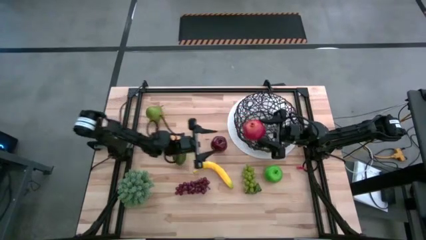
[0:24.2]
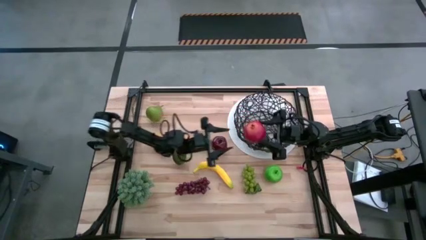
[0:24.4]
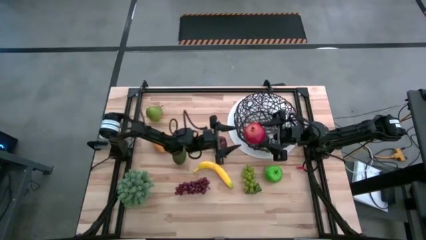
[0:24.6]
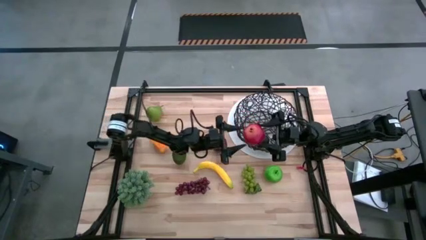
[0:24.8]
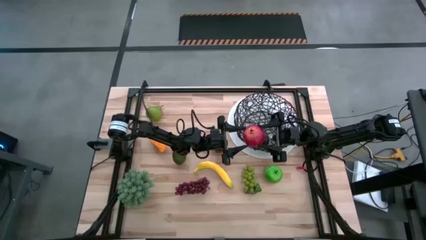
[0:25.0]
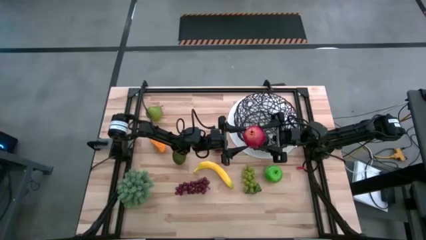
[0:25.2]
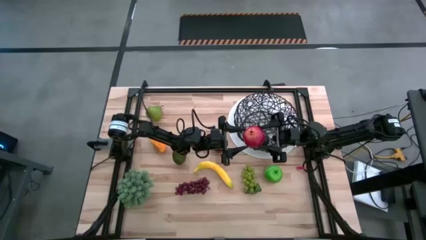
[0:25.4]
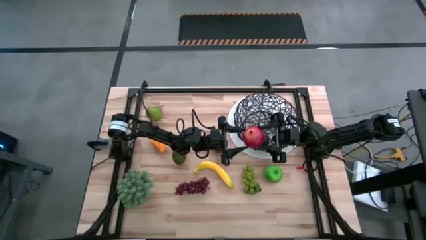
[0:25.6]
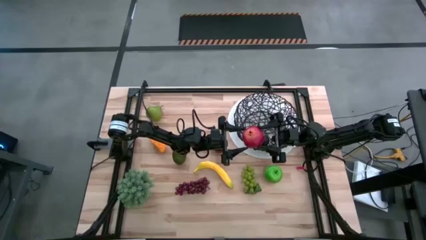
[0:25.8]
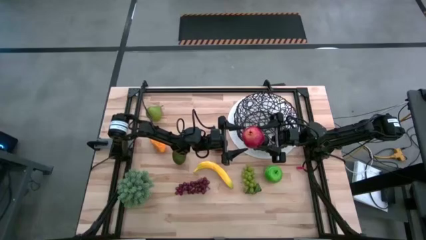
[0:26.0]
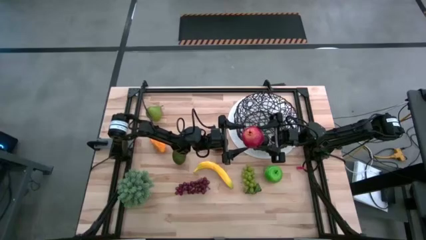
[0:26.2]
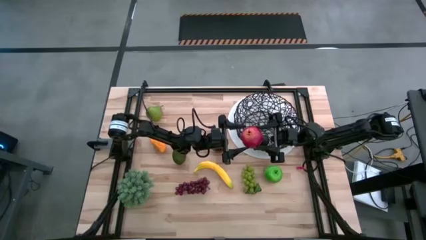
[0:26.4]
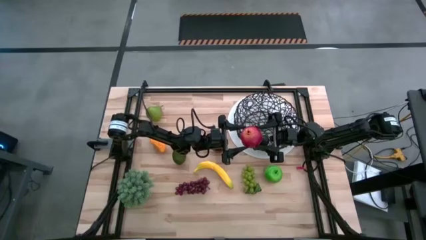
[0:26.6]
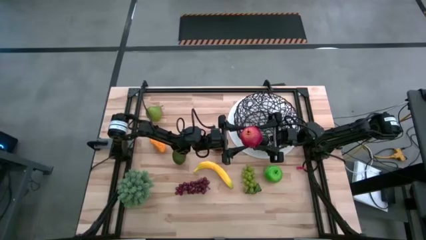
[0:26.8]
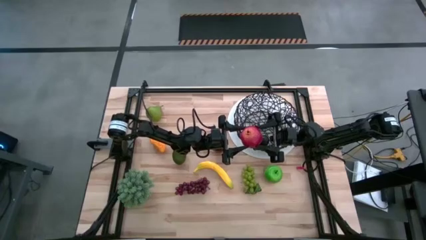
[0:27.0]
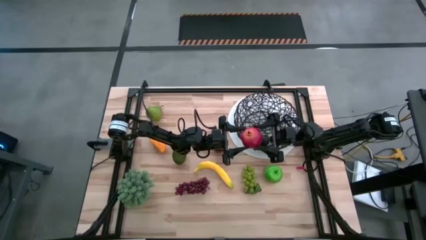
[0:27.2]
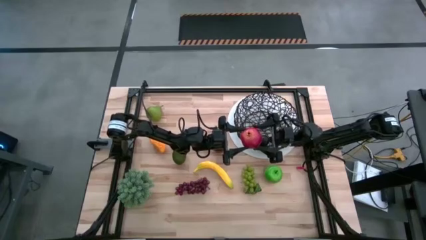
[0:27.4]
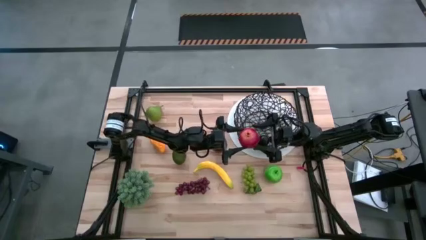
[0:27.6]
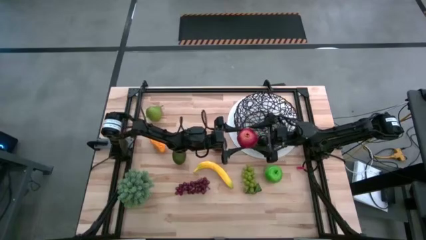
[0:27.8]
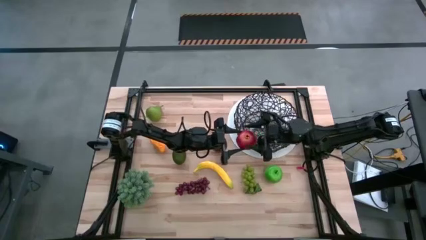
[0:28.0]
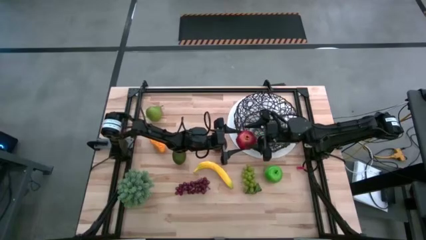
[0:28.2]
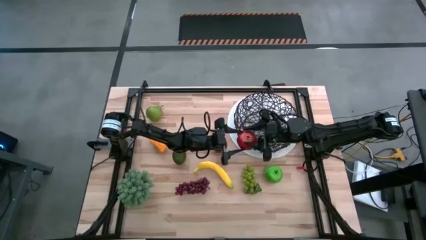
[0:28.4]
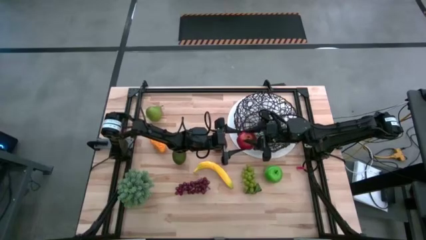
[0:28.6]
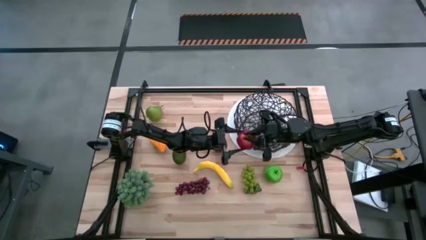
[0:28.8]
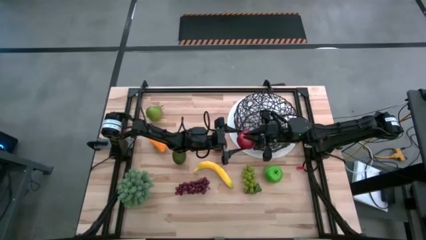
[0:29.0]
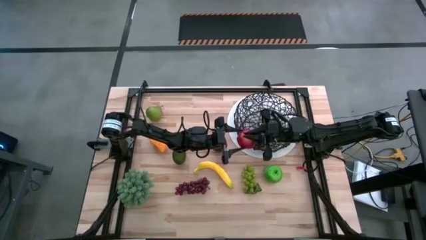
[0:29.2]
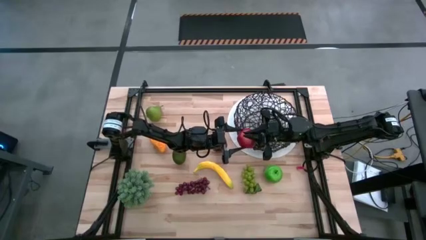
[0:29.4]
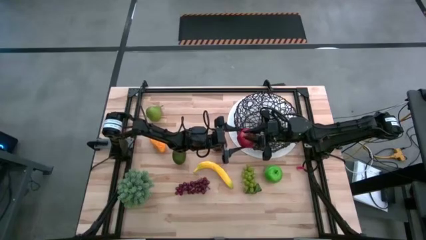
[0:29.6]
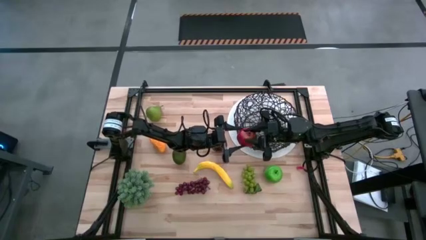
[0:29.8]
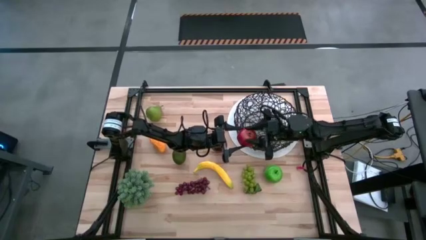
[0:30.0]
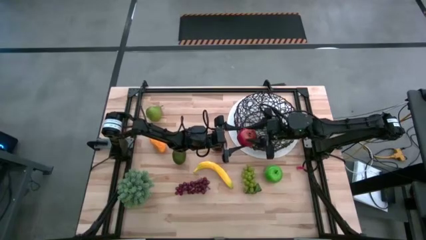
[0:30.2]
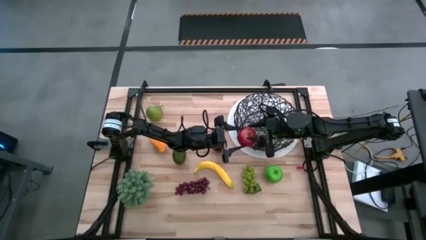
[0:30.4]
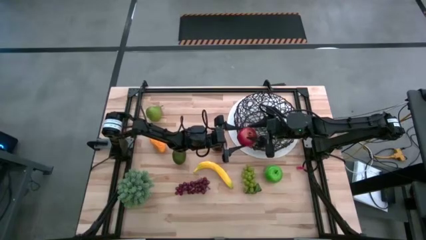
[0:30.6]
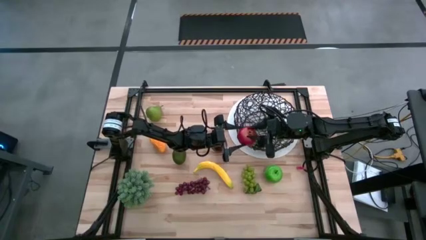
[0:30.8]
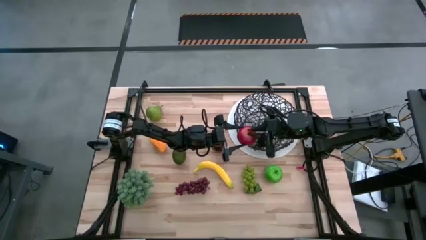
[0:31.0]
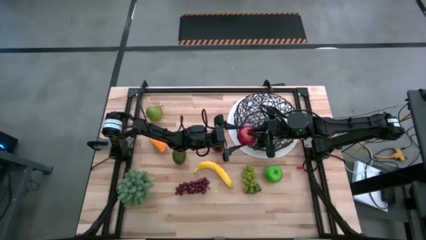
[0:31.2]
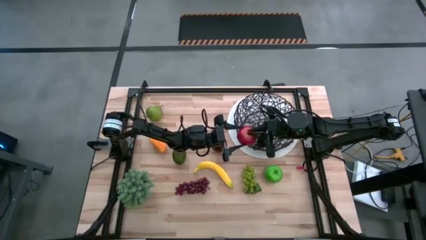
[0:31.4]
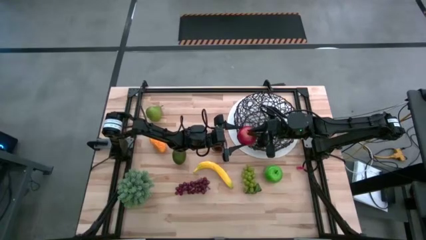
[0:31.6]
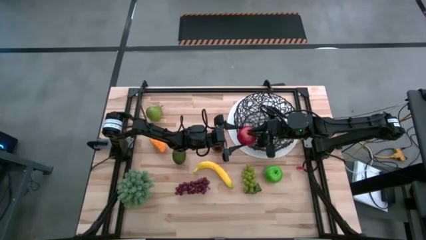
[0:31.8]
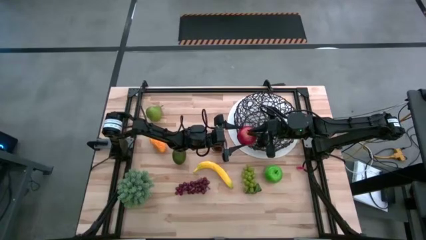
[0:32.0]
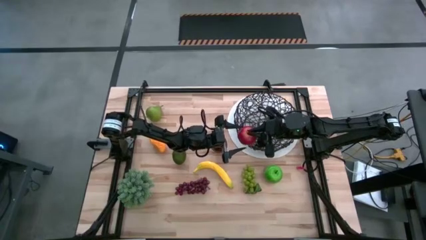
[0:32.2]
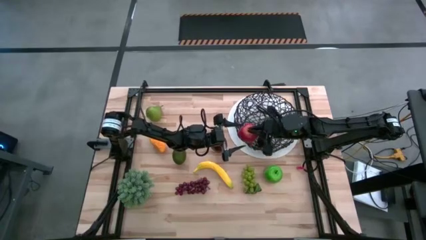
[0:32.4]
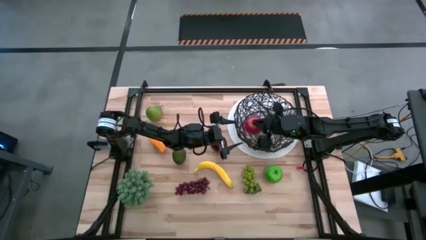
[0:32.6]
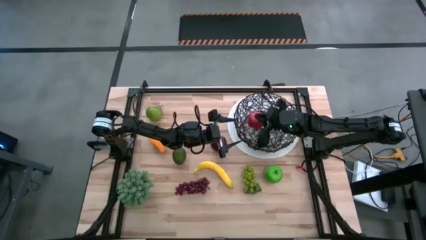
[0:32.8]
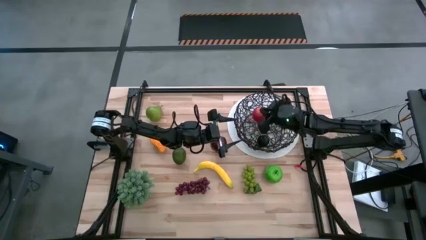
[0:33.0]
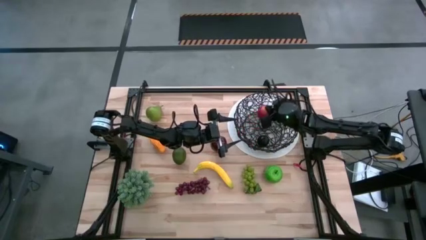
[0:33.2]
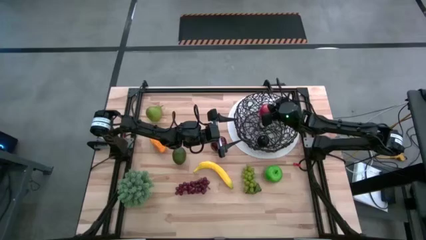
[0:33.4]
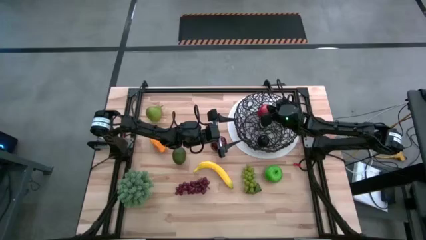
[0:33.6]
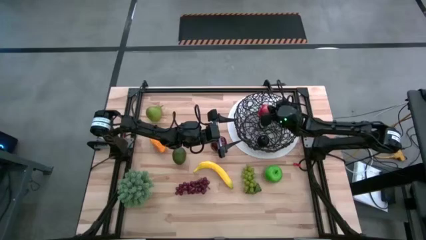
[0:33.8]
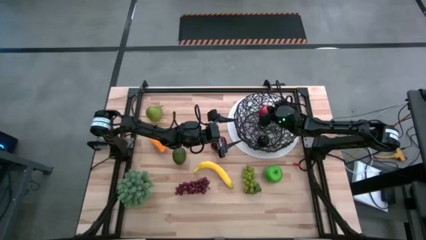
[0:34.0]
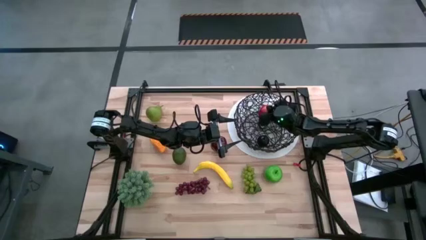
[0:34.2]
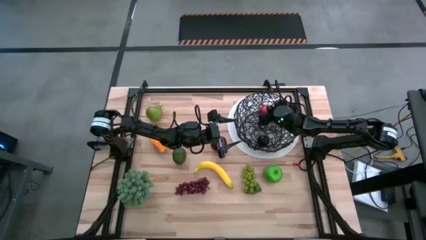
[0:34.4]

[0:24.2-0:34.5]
Task: Build produce basket
Put the red pomegranate into the wire basket

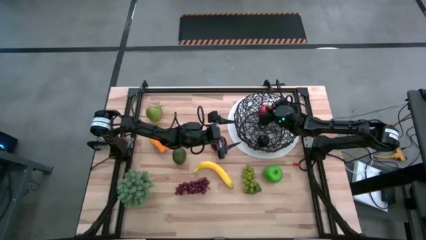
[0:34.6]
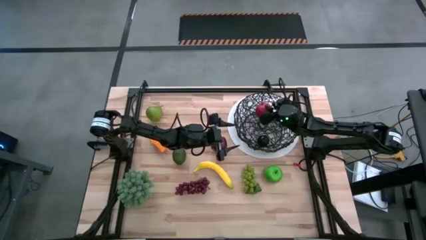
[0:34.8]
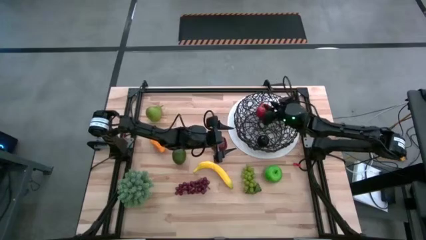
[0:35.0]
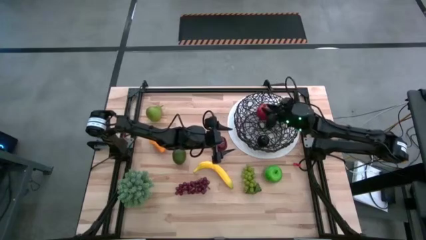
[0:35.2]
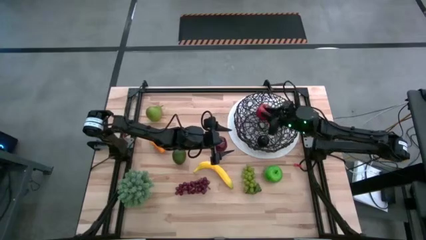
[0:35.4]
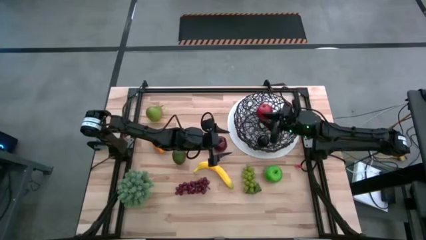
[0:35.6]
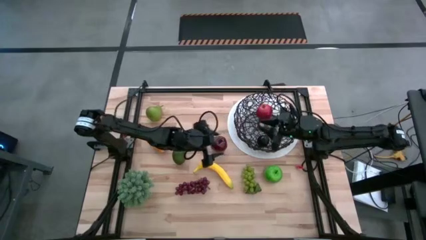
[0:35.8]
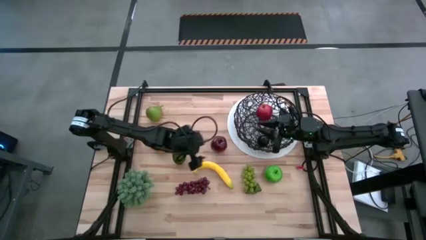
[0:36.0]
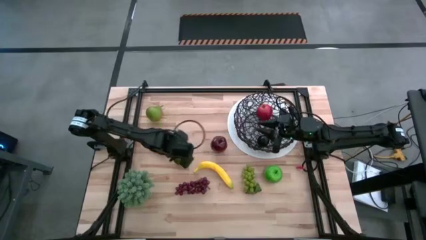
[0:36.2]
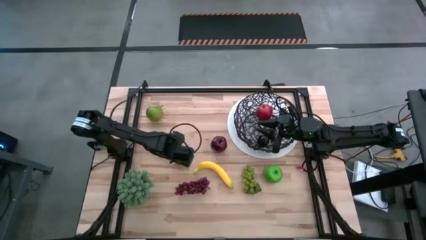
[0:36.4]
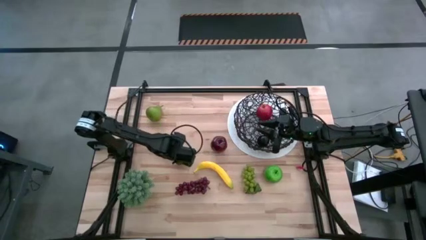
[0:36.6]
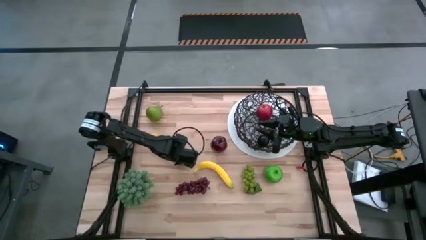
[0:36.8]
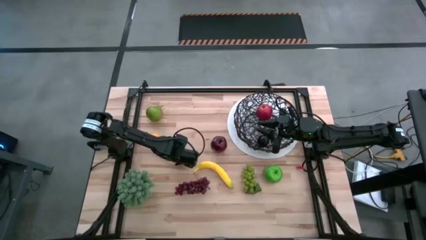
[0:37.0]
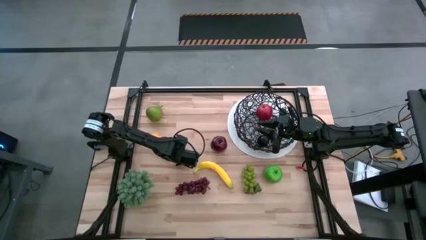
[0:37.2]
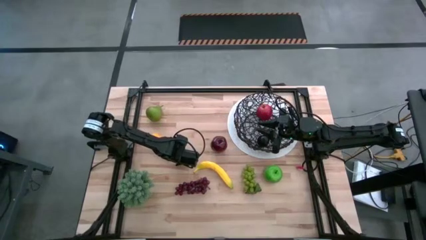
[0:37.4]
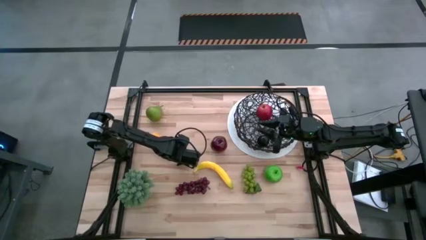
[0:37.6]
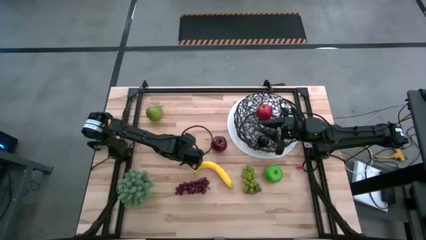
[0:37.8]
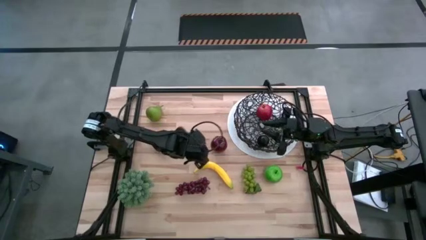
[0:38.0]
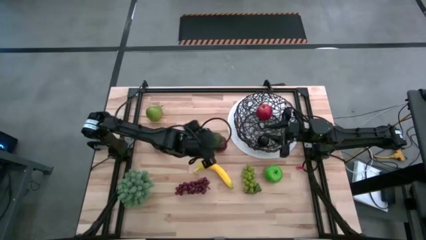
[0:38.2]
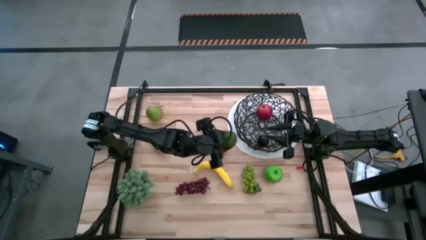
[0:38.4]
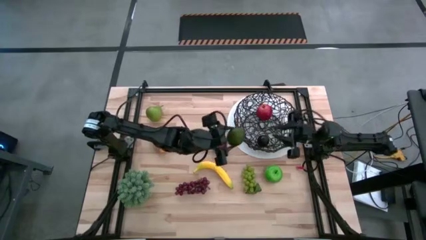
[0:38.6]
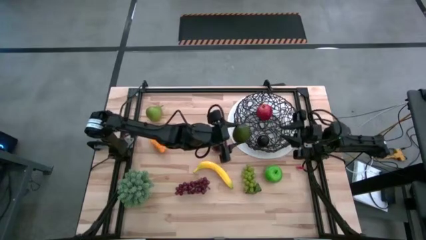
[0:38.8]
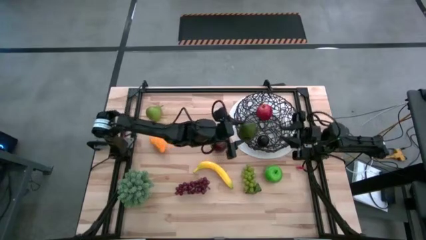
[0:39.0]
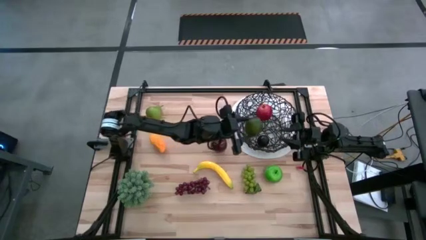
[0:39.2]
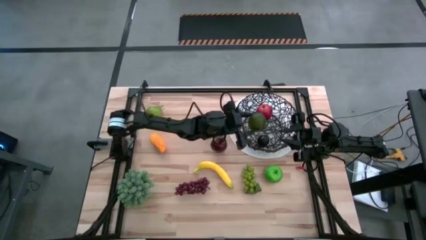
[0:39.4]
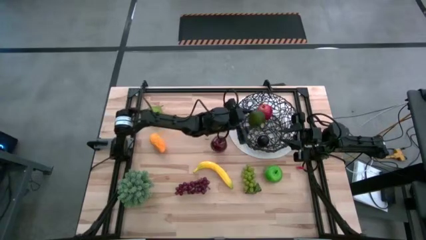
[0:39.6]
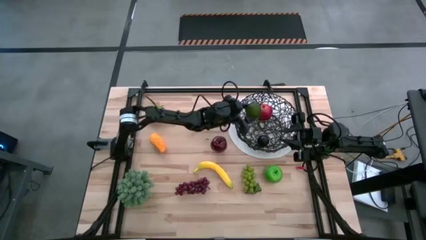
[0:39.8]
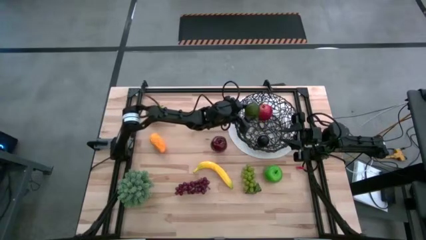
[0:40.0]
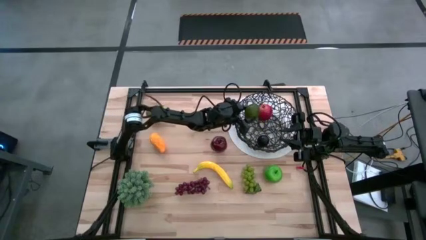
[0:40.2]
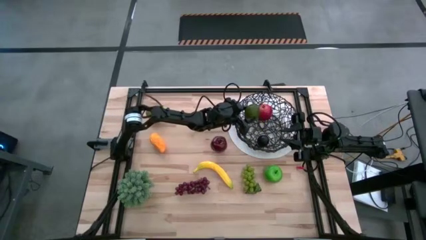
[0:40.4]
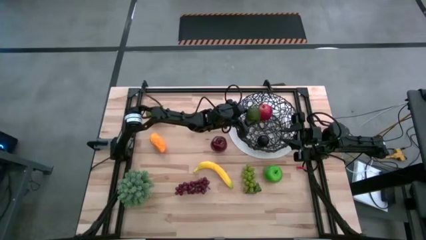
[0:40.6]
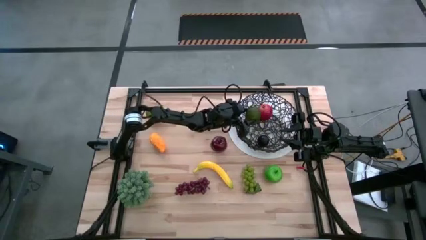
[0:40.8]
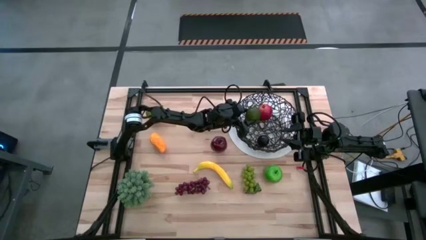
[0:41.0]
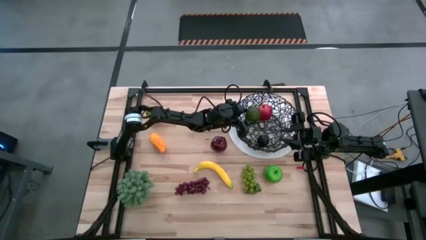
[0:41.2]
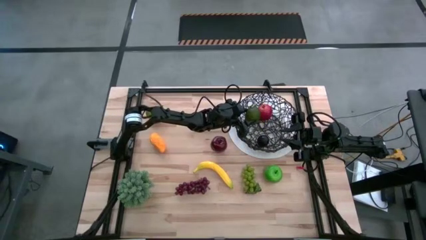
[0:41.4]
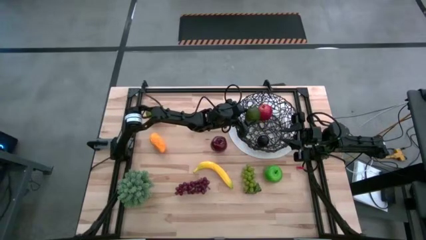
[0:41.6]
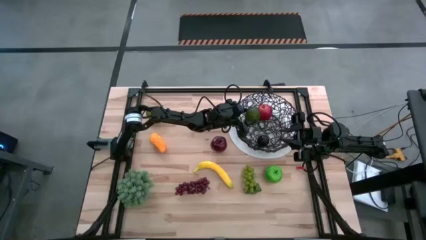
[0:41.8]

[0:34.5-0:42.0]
Put the green lime into the wire basket
